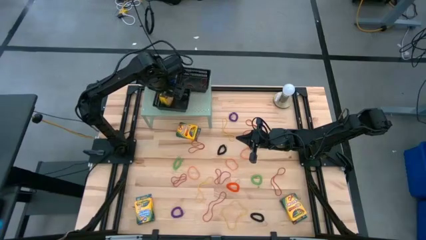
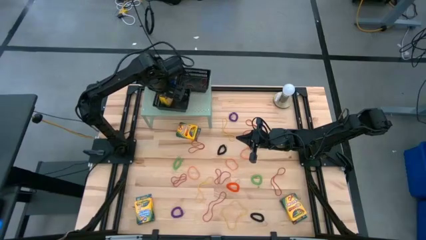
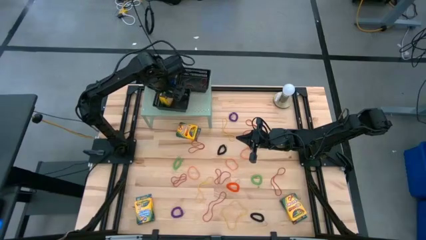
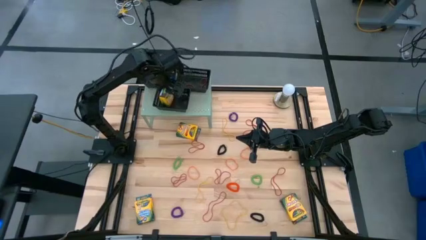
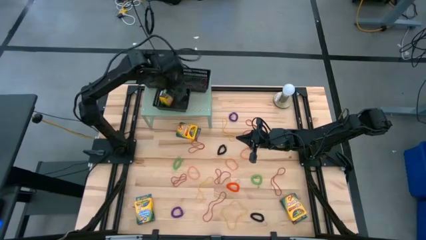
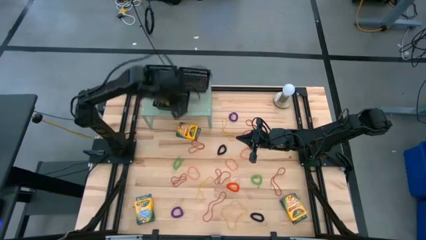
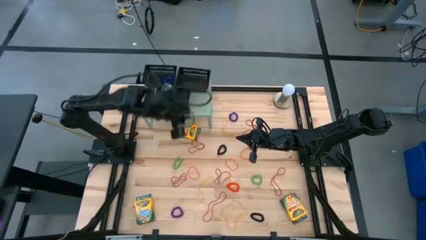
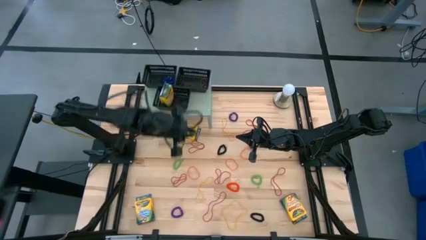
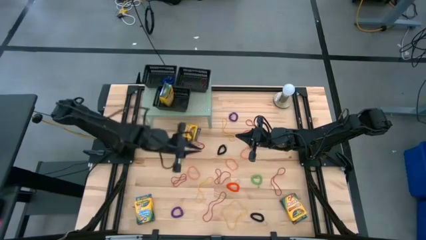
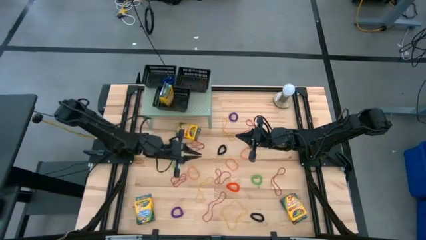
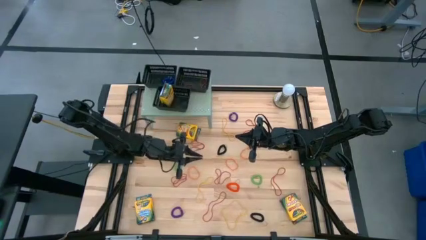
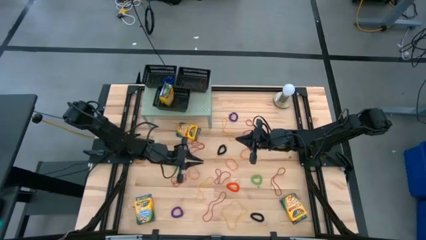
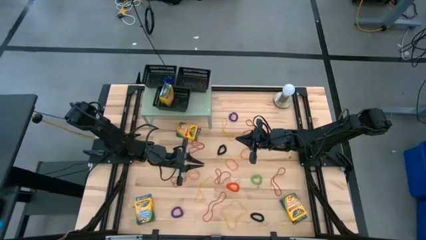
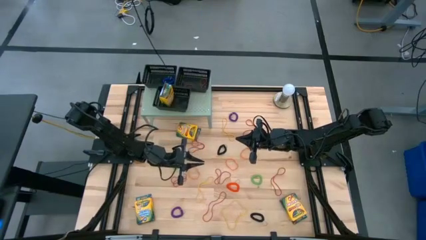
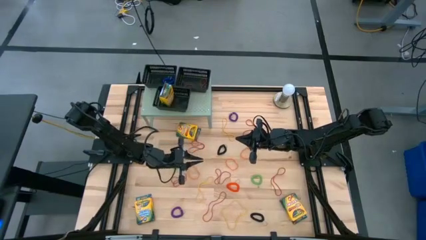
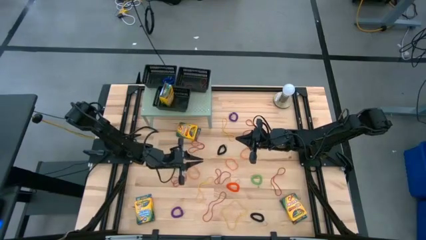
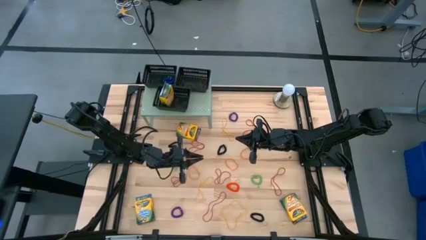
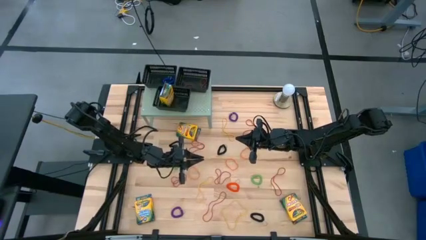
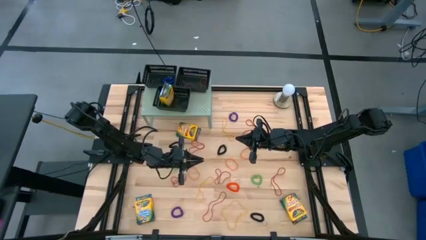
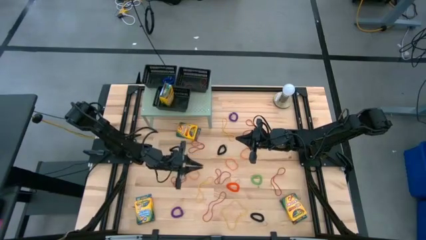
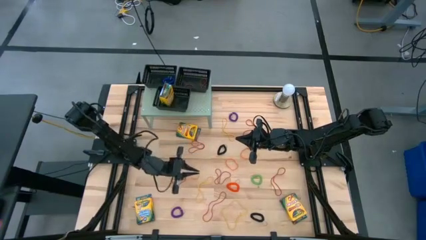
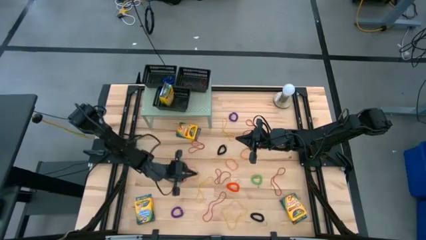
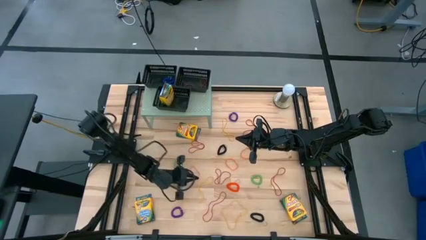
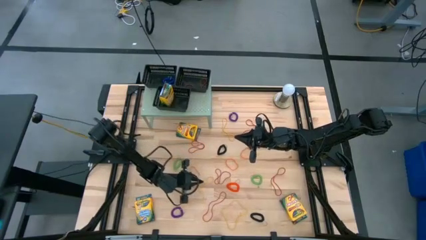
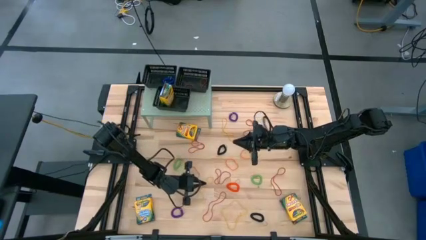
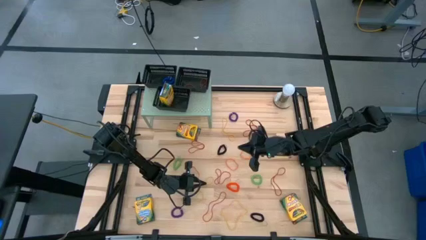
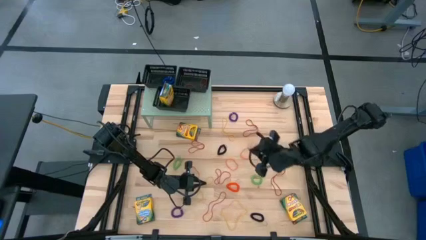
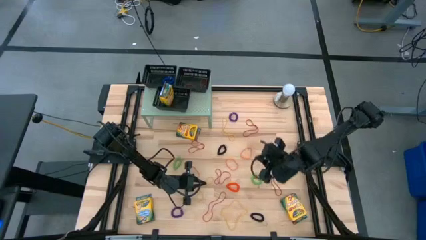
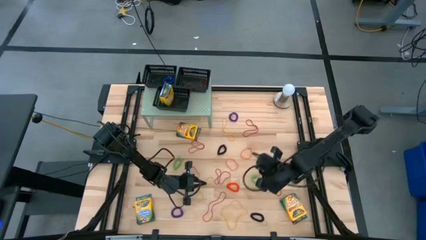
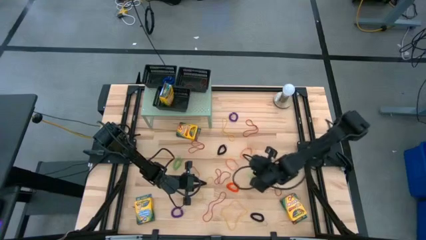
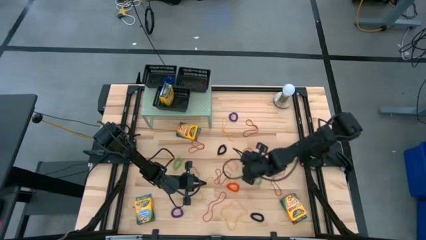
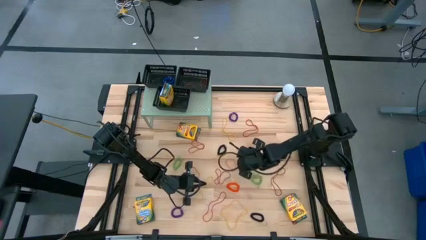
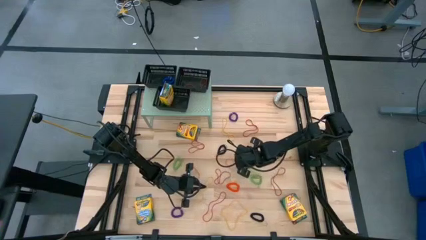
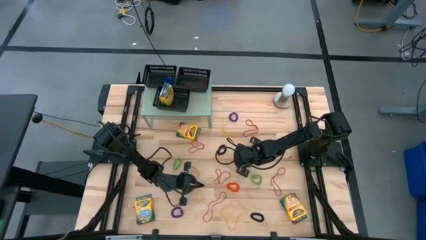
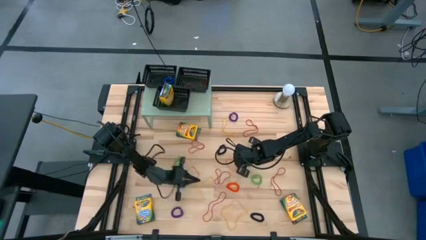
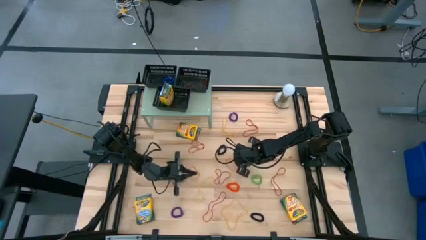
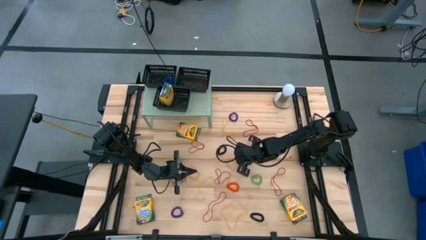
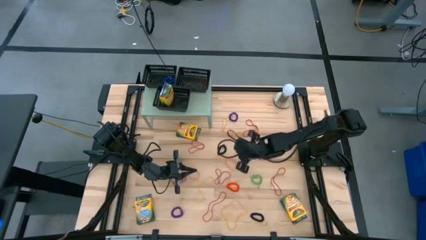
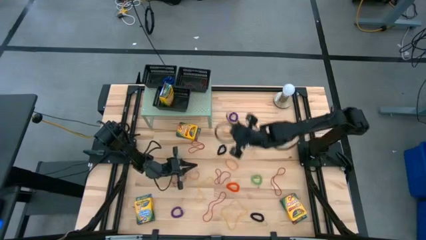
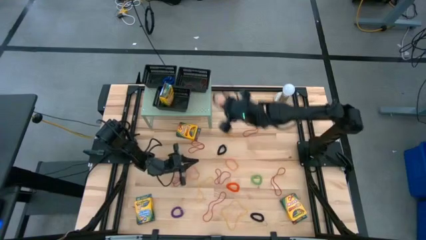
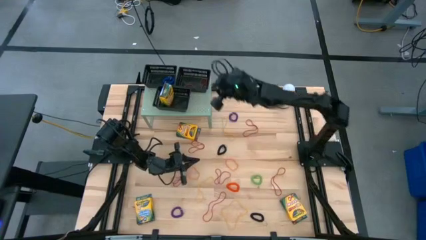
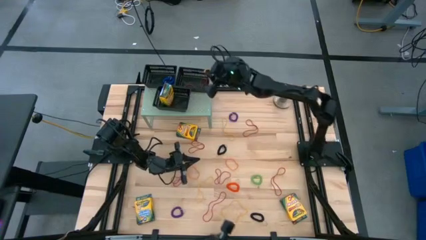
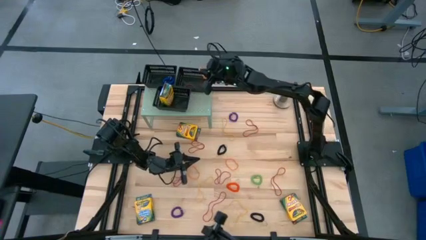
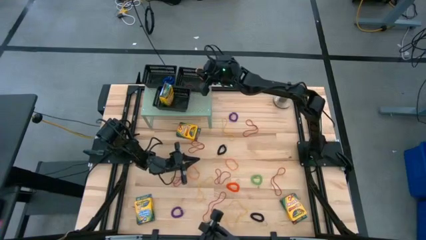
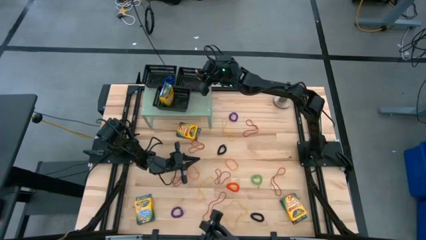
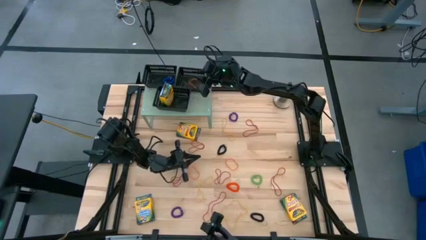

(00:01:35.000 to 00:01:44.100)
Task: Pick & Place Office Desk Supplies
Put the orange rubber band into the top right black bin

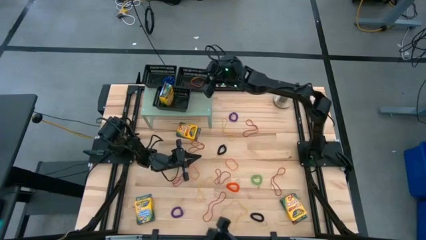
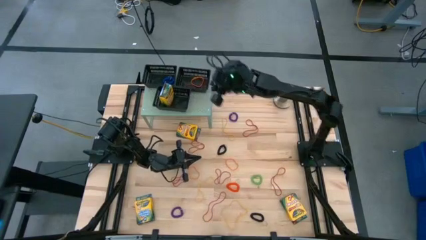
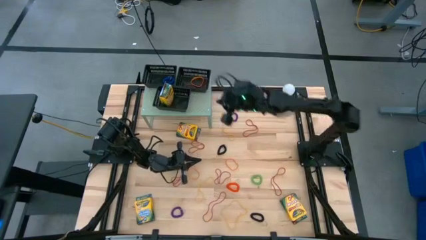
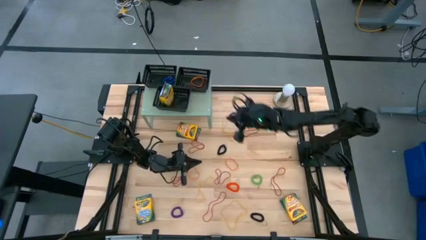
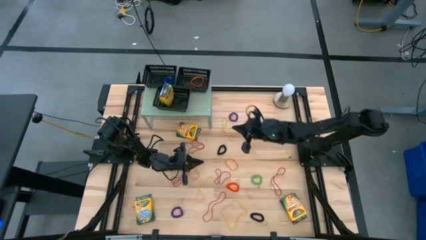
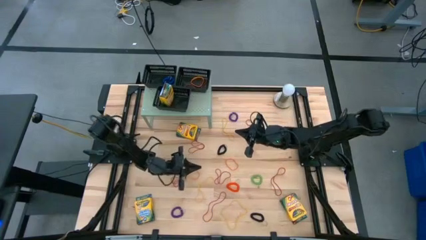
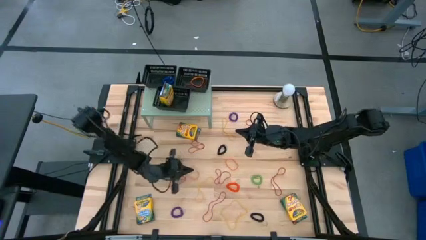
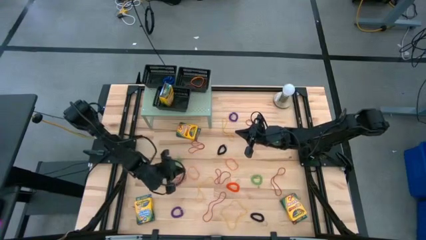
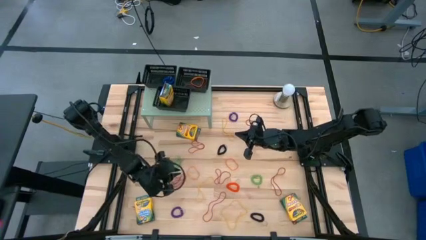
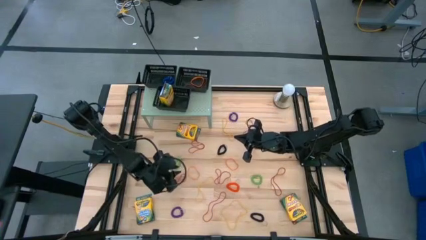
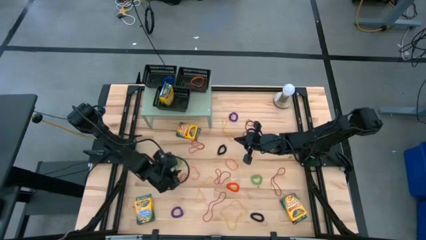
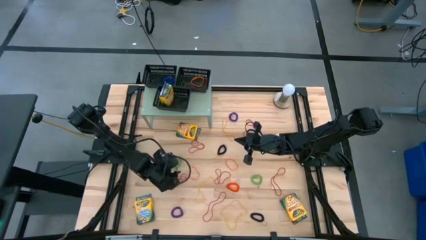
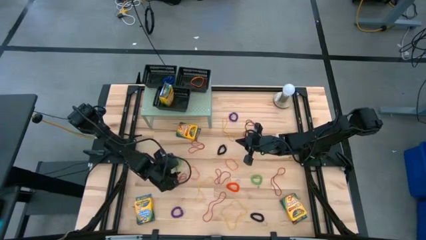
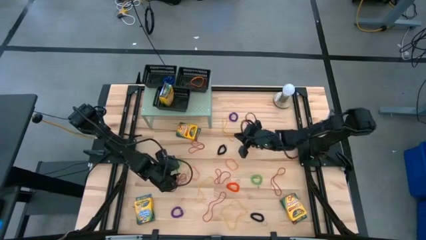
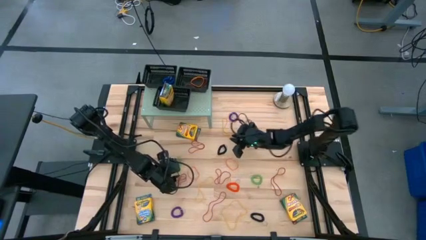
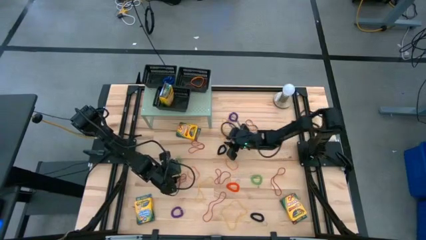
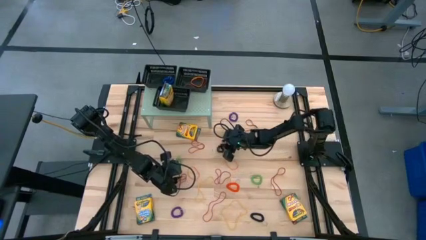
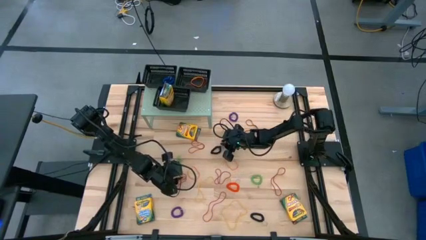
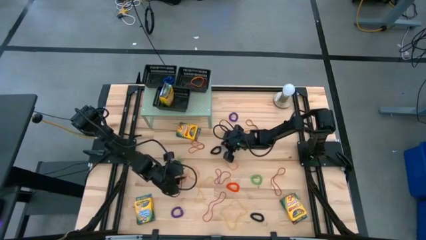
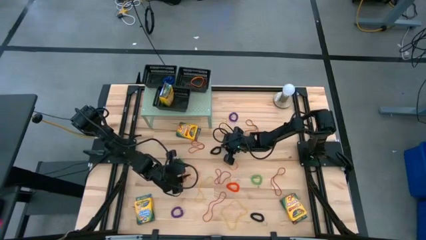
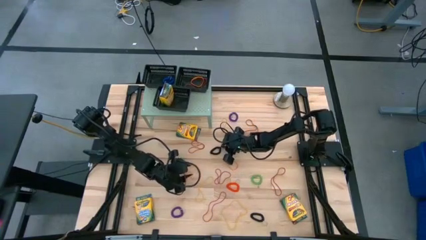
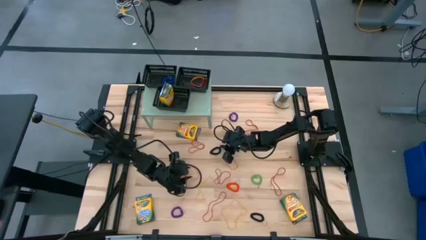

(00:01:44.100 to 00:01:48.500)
Put the black spring rubberband into the top left black bin

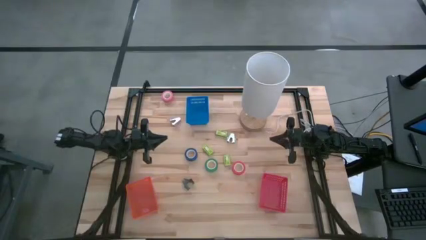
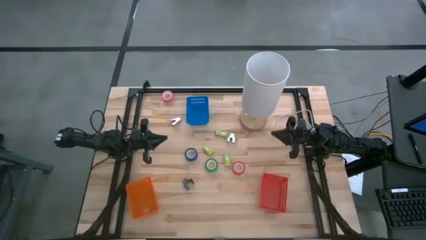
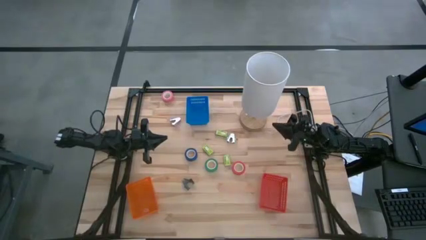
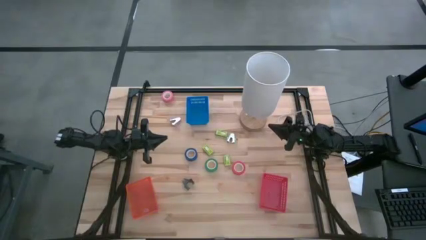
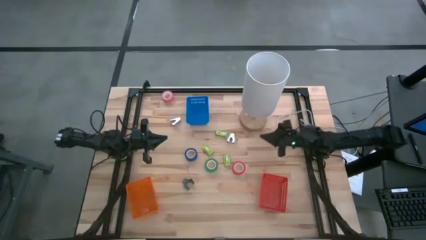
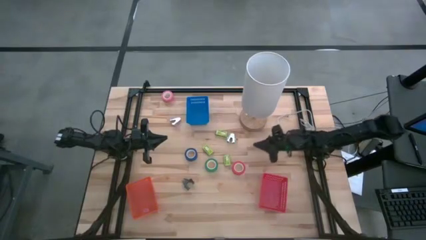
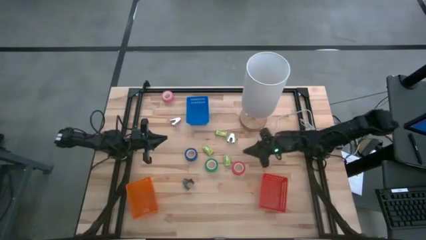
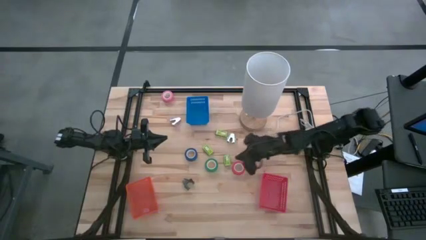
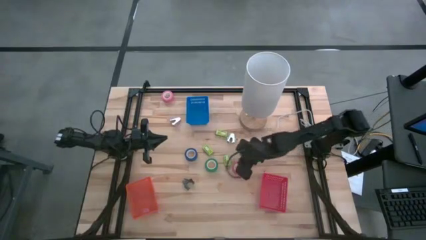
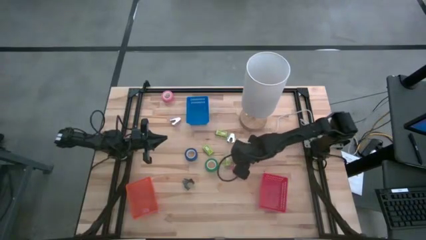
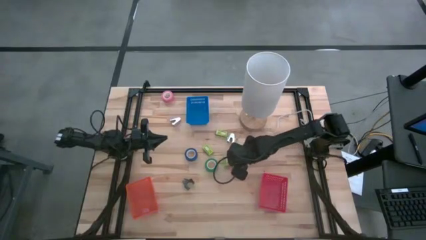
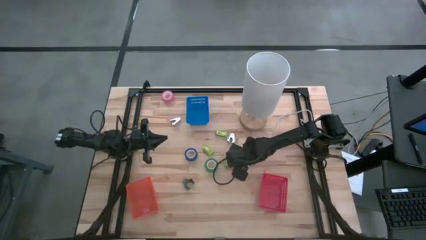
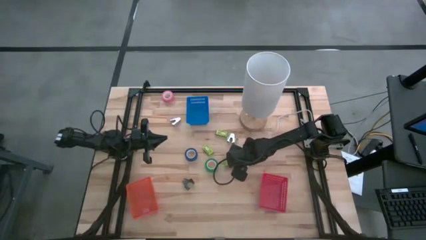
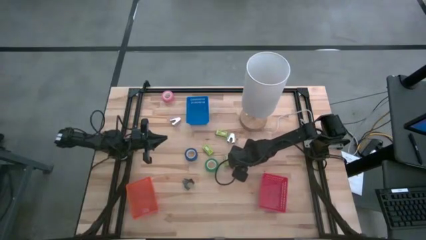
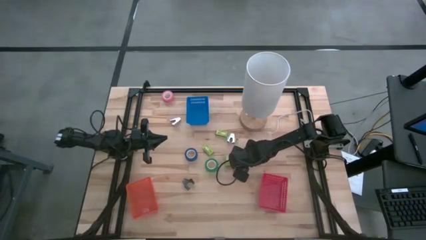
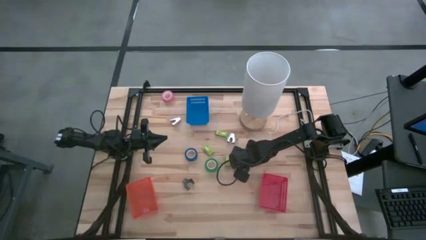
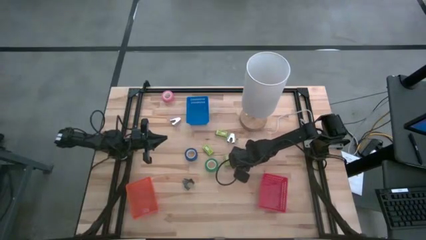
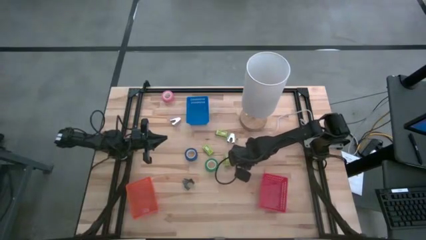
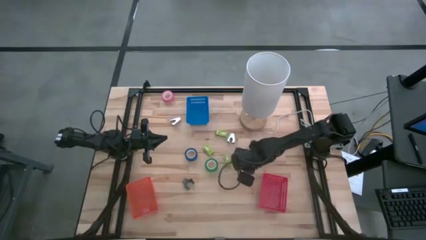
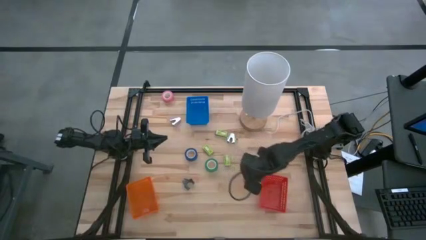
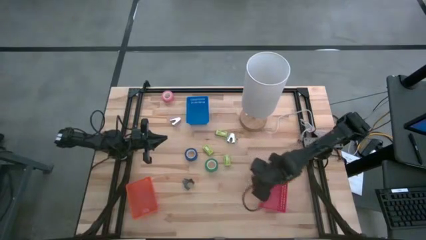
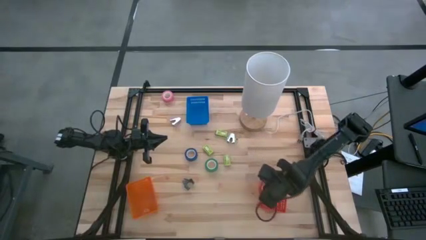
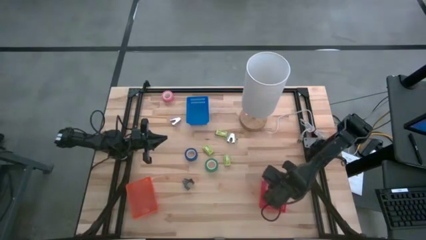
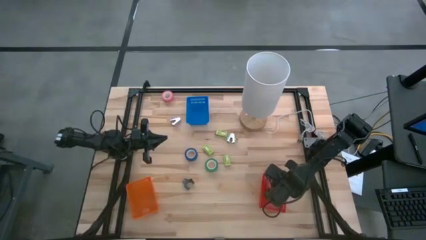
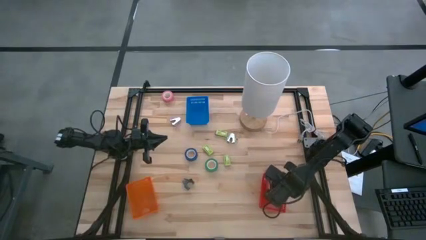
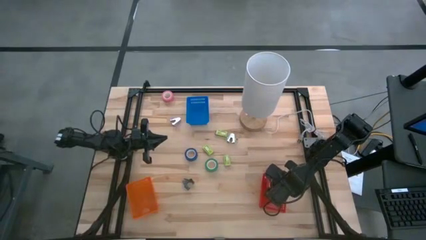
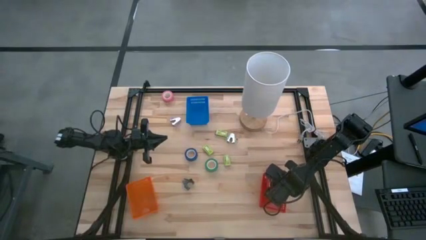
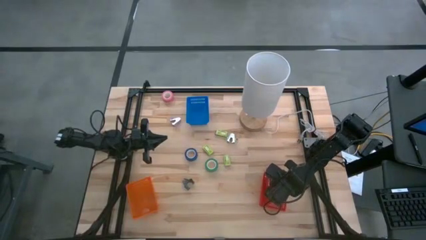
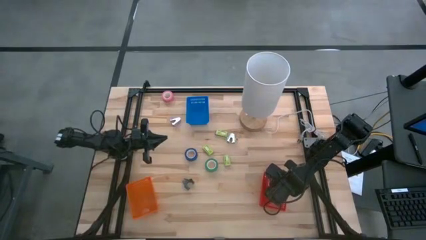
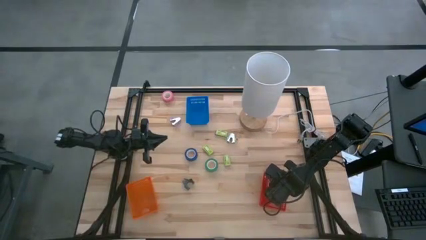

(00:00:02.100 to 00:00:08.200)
Task: Pick and place Stapler, Stapler remover, tape
Put the red tape into the red bin
